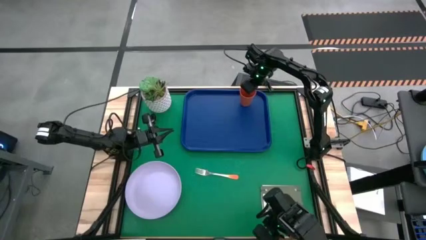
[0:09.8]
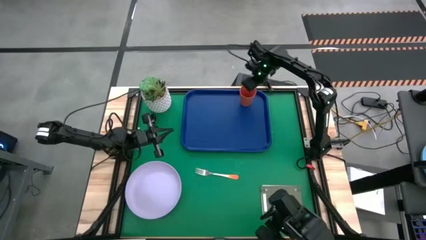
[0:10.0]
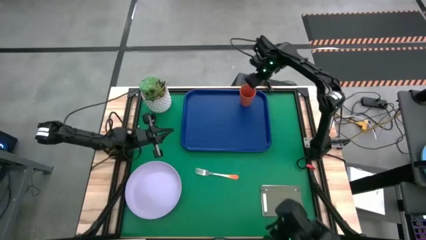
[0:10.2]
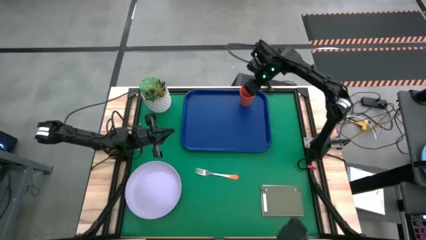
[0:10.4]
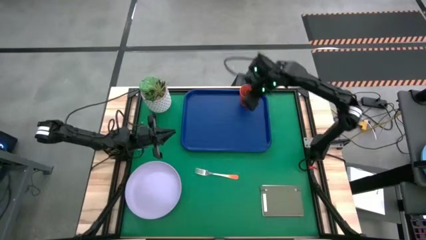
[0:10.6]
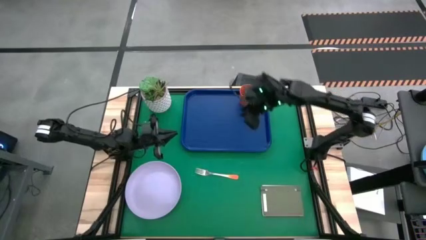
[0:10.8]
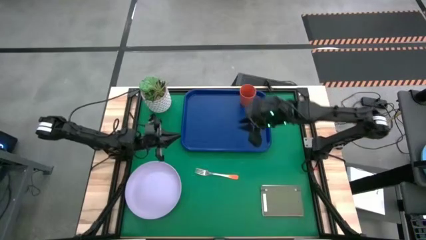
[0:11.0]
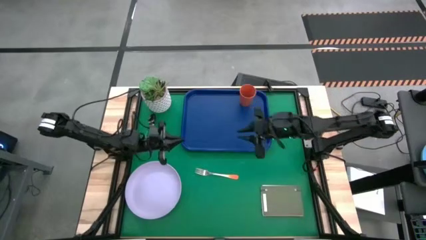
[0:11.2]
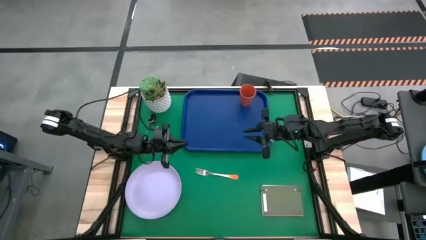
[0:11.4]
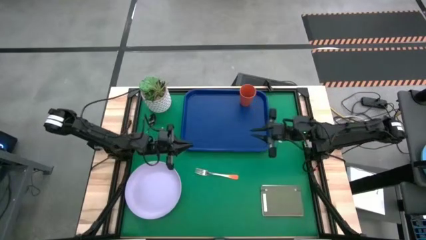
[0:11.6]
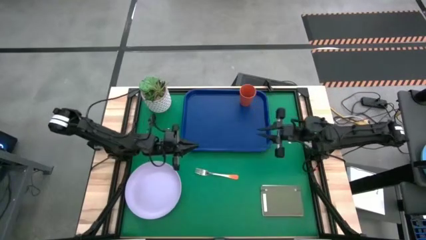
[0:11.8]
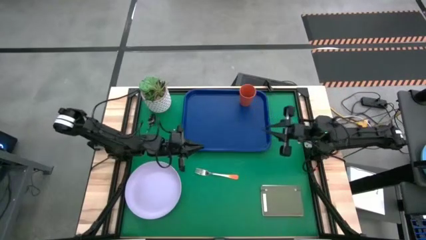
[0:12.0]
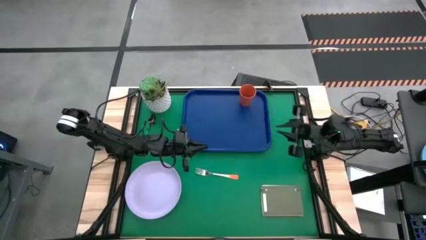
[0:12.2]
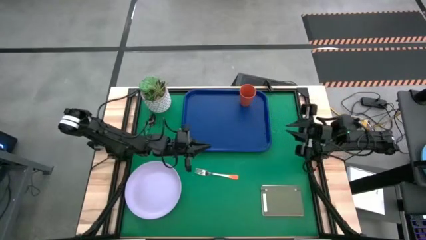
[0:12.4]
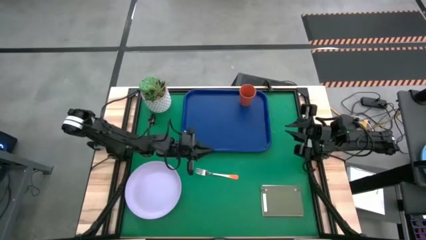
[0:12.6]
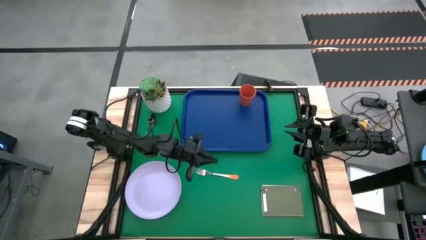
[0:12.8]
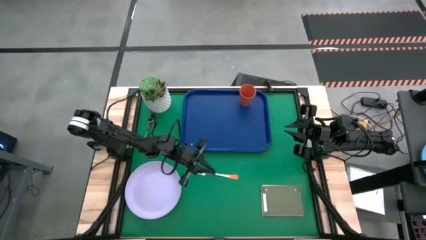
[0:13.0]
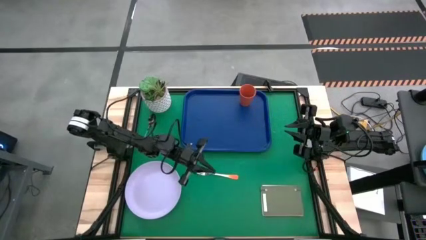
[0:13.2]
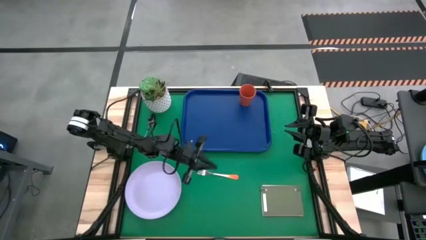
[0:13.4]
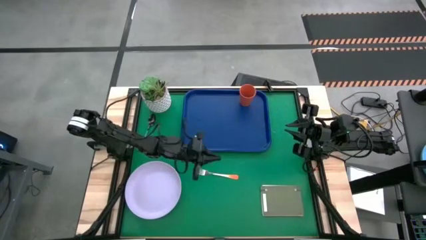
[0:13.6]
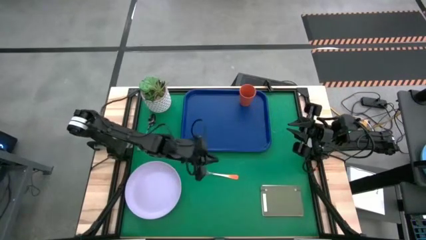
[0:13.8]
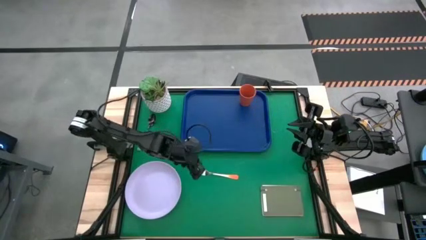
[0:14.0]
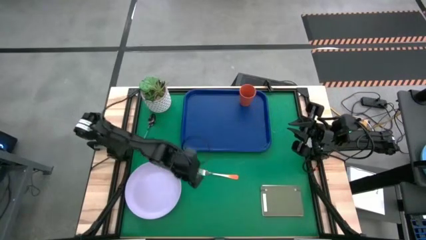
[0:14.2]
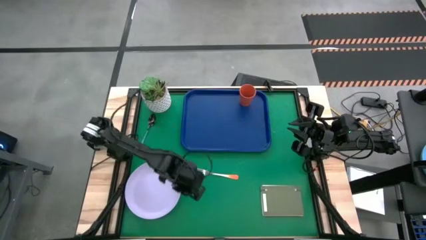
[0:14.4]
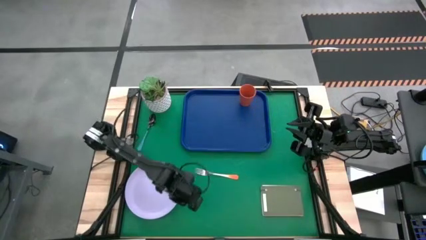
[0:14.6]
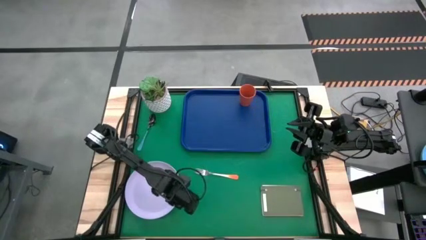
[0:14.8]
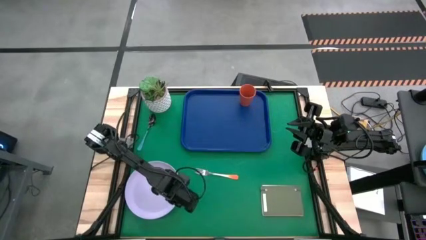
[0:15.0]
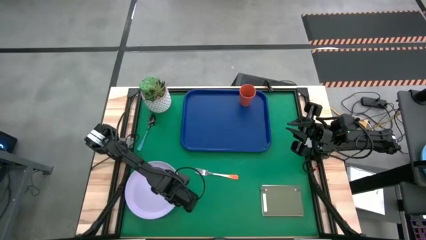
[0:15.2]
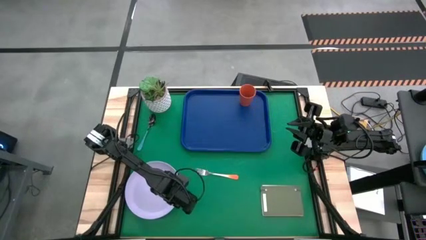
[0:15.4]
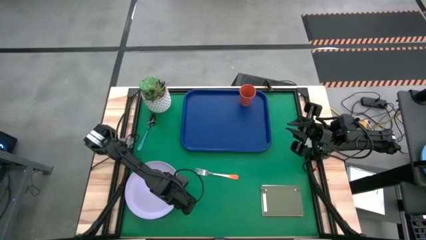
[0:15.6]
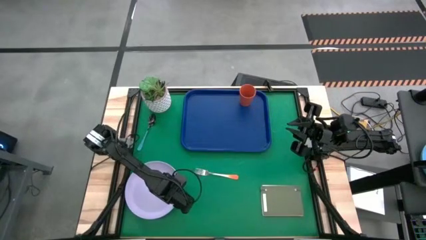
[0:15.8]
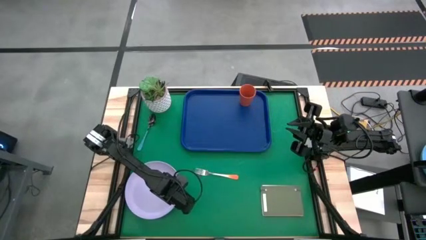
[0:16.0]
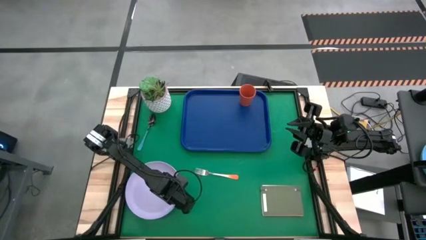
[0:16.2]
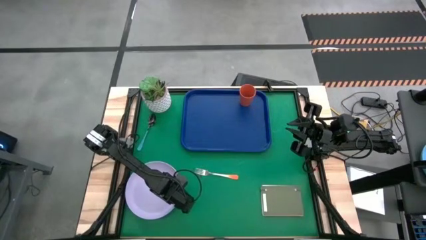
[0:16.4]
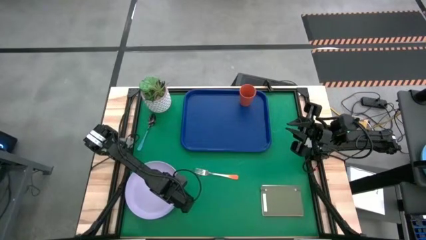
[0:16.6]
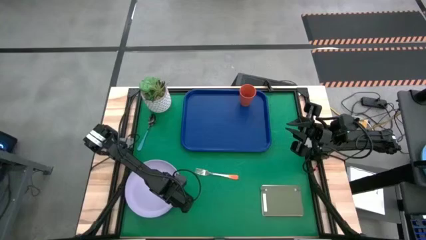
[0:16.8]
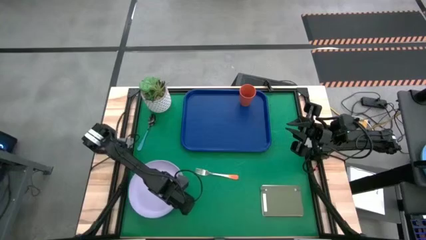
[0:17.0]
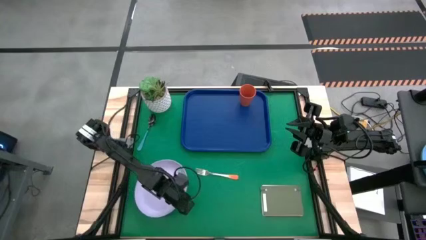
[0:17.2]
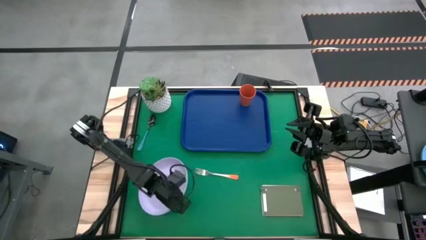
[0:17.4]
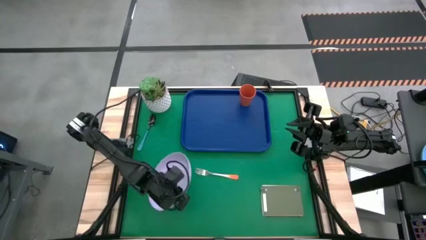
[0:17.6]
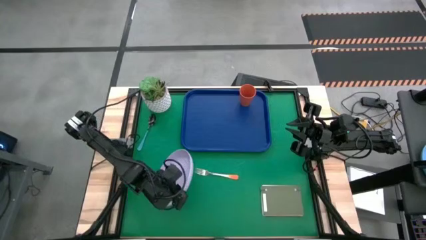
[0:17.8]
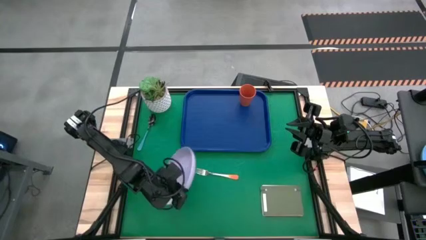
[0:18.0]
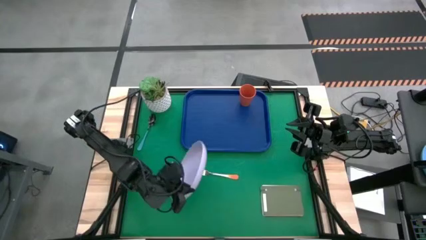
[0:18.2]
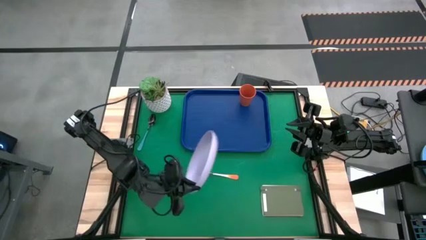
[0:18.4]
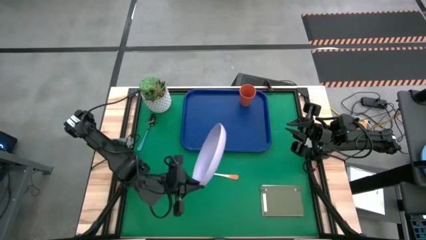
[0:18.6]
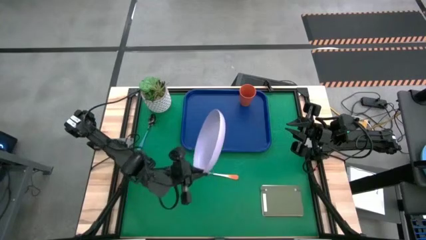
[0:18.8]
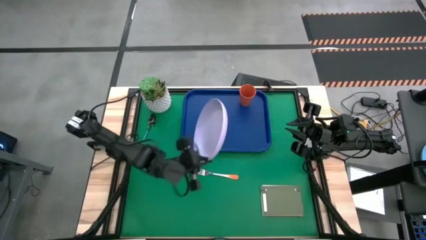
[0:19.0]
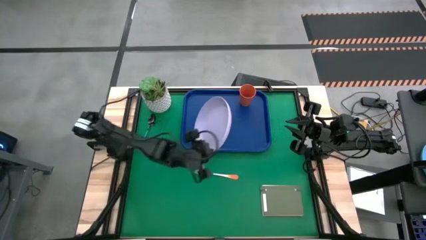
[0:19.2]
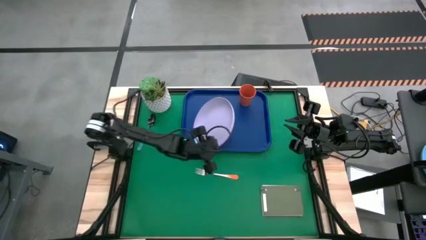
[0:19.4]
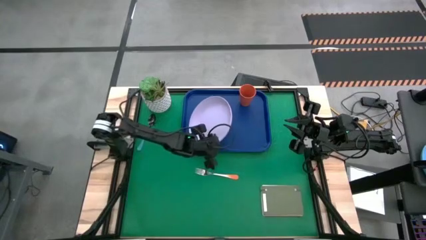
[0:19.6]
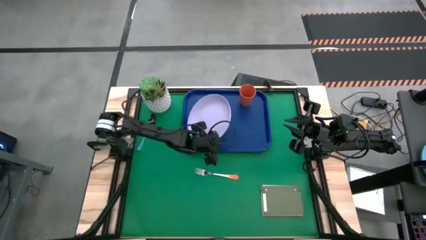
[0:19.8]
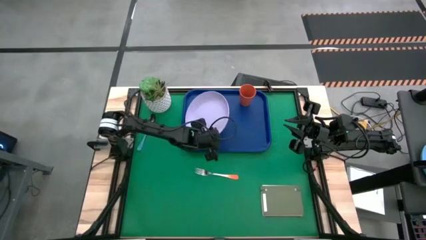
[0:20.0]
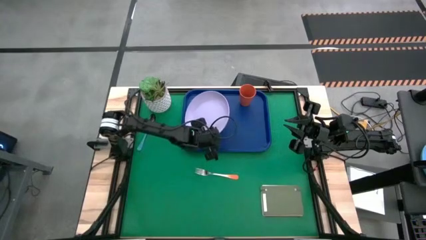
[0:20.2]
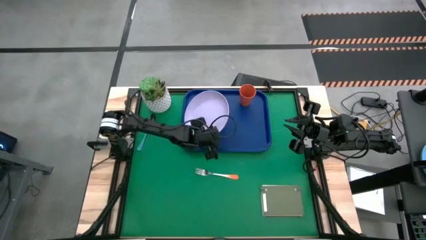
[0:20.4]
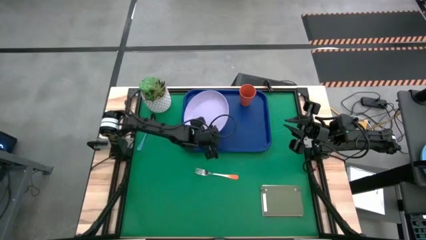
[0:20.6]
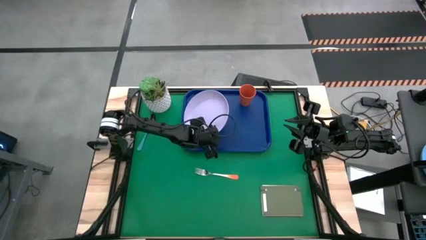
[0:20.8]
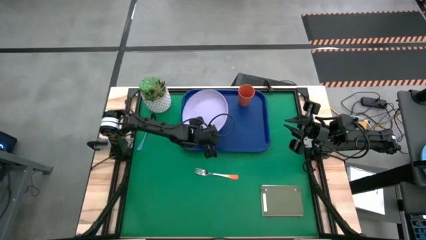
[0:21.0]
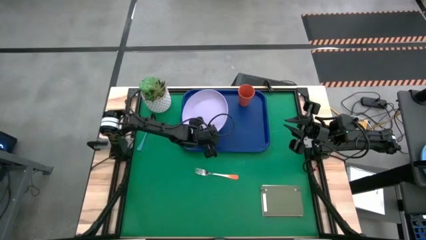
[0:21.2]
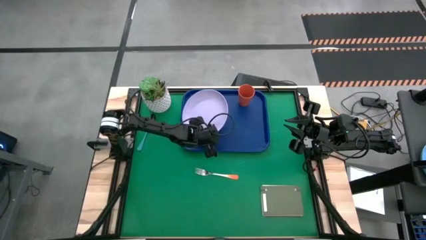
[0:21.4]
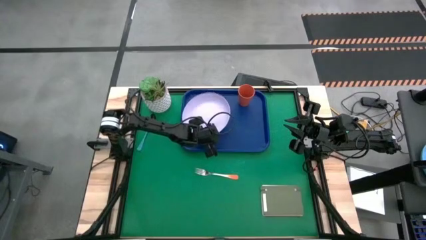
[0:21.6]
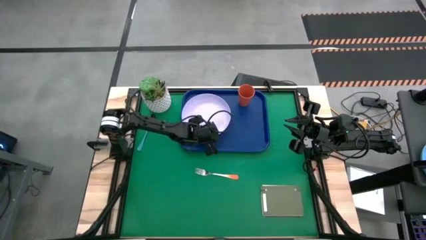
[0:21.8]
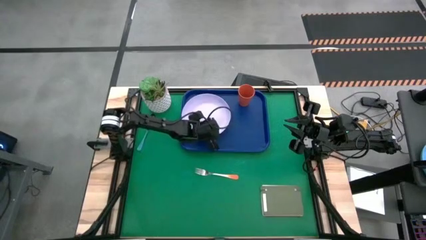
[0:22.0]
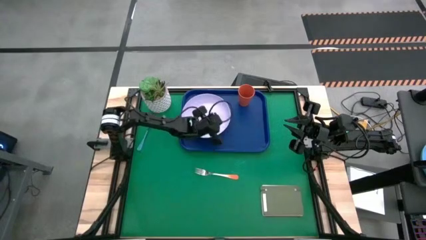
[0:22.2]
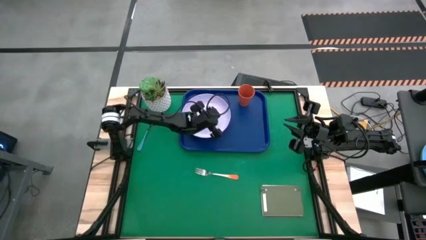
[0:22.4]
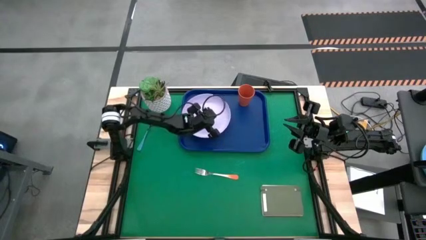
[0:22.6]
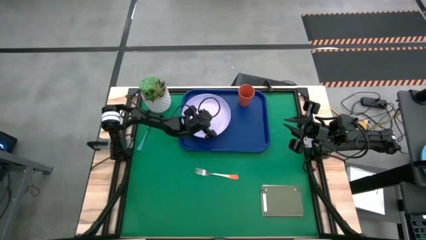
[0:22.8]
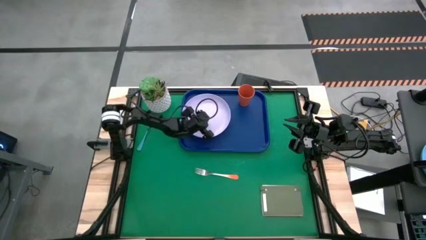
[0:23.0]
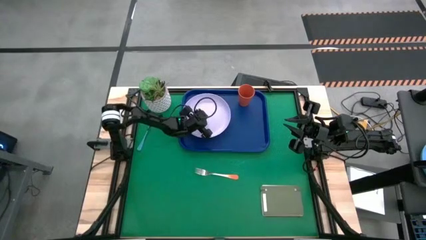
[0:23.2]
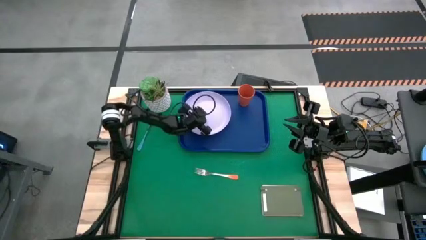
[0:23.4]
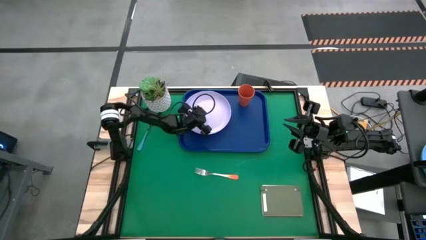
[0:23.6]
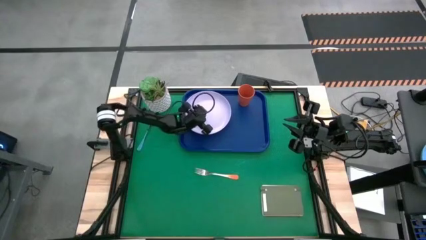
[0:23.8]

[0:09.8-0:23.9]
Task: Pick and place plate/cup/fork/spoon on tray
Put the purple plate on top of the blue serving tray

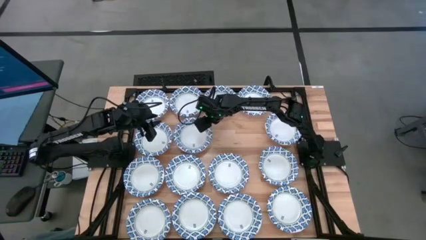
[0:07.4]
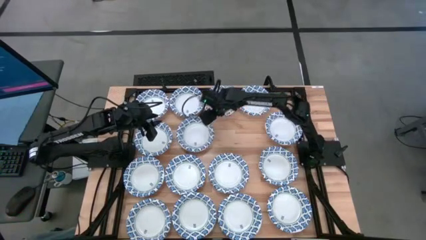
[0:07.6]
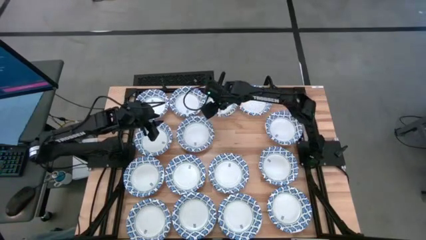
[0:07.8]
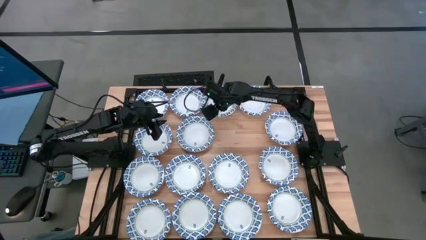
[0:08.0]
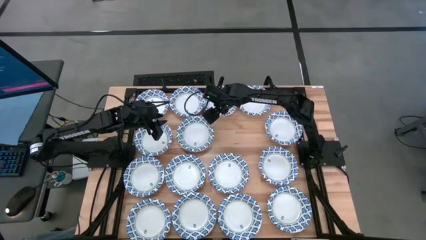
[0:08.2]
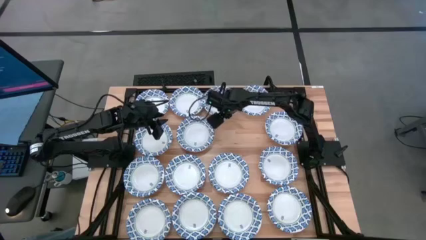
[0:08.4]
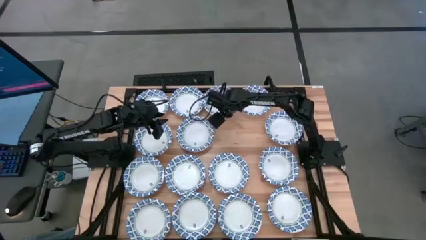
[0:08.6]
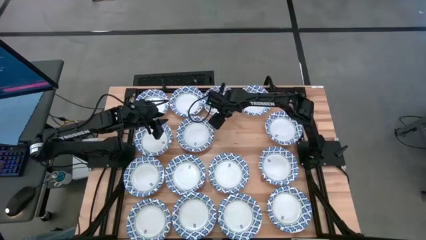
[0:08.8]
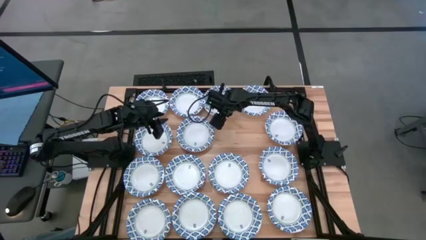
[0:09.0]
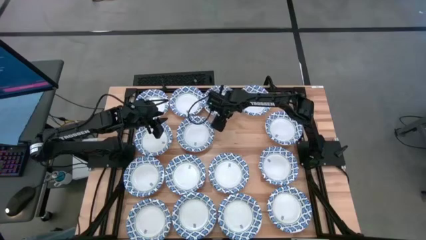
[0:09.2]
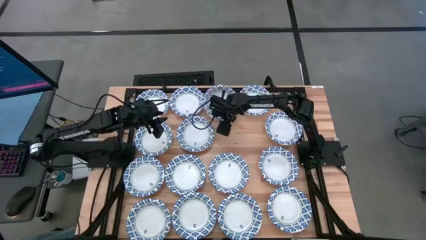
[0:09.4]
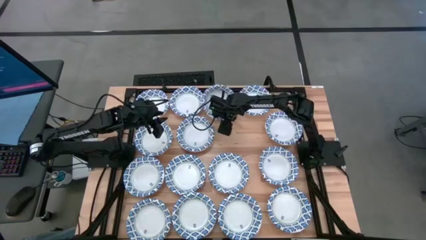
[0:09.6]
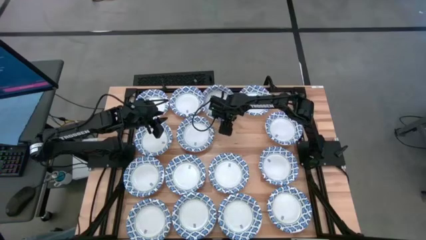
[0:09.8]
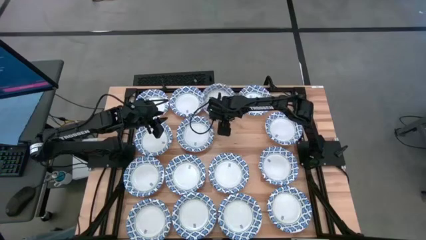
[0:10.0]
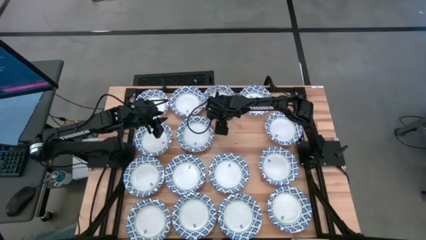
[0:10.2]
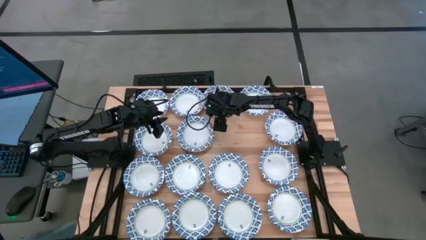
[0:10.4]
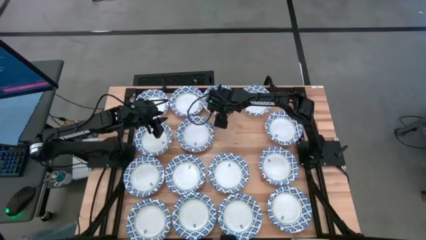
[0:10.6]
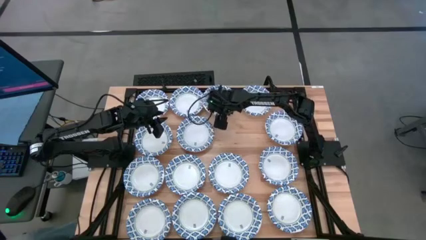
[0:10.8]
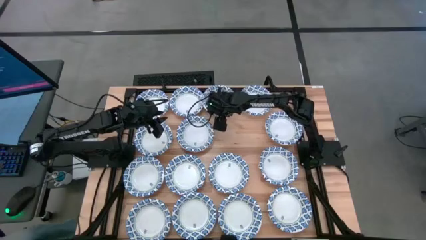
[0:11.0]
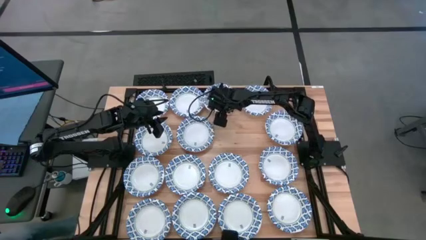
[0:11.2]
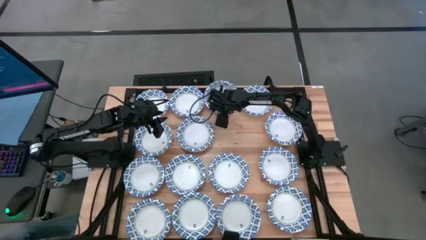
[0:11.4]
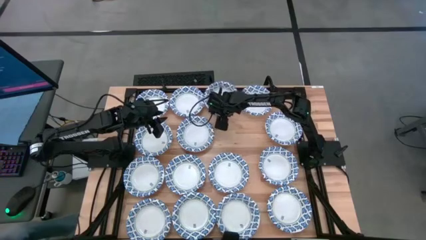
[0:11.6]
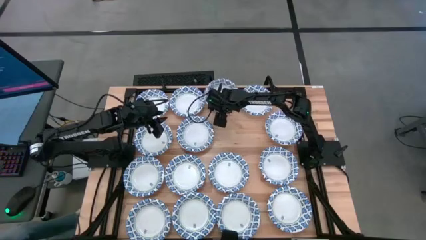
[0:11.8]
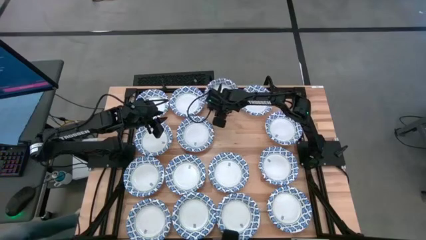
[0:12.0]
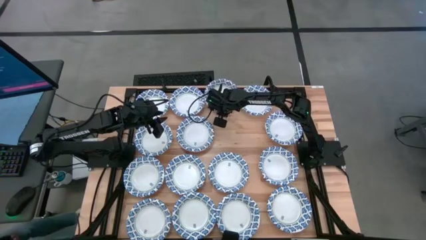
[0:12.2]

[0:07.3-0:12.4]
Task: Nest bowls inside each other
Stack the blue bowl on top of the blue bowls
